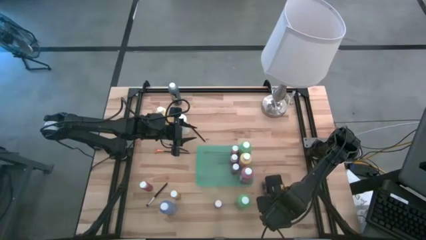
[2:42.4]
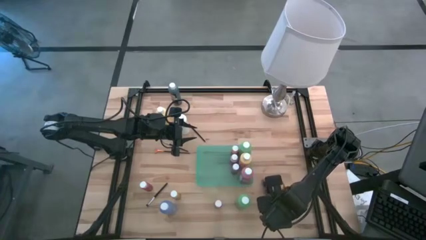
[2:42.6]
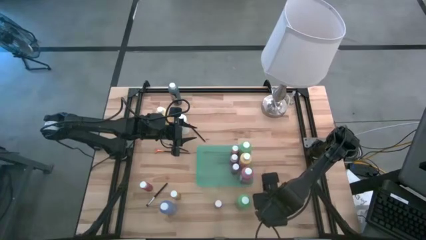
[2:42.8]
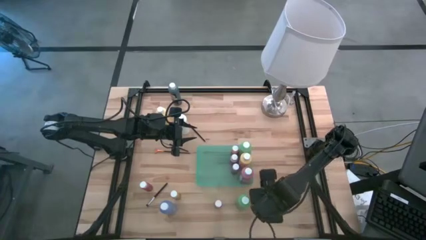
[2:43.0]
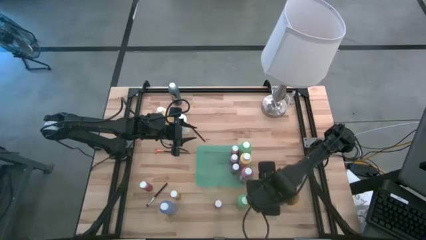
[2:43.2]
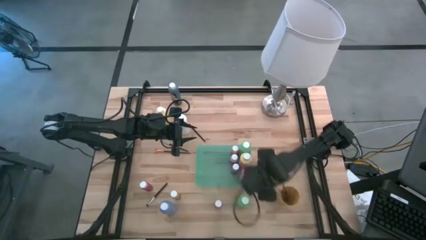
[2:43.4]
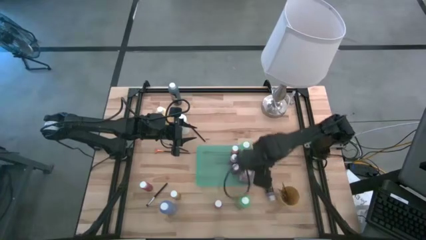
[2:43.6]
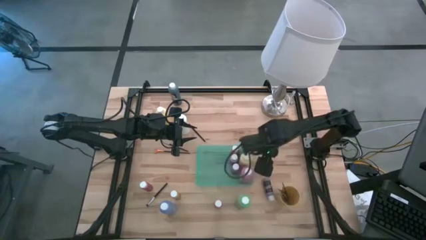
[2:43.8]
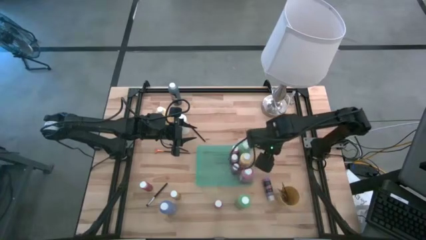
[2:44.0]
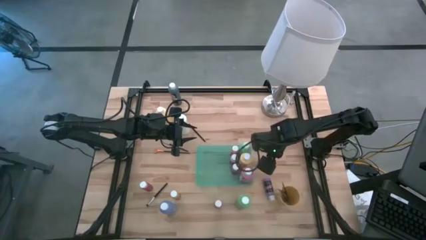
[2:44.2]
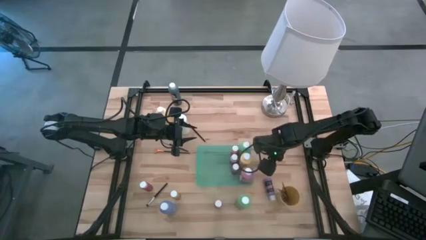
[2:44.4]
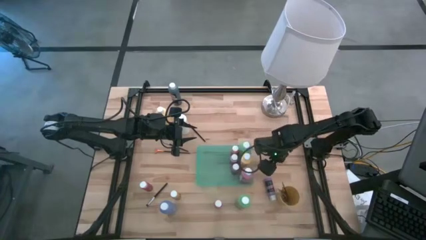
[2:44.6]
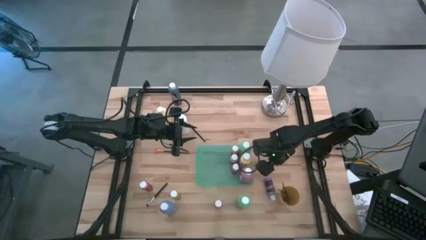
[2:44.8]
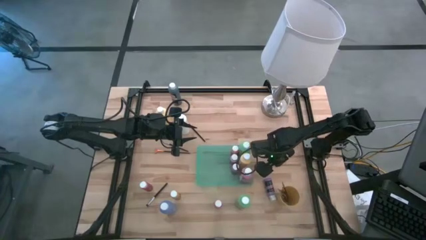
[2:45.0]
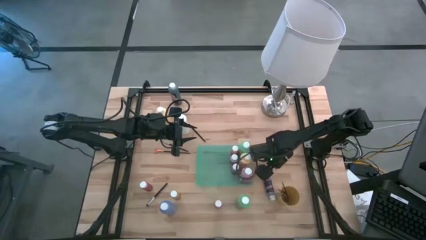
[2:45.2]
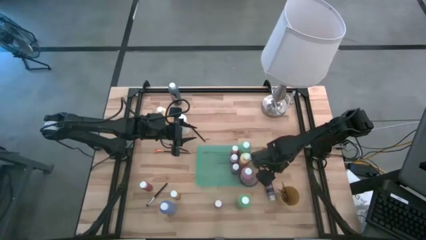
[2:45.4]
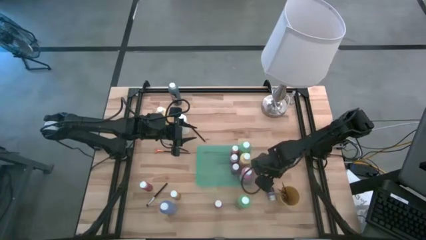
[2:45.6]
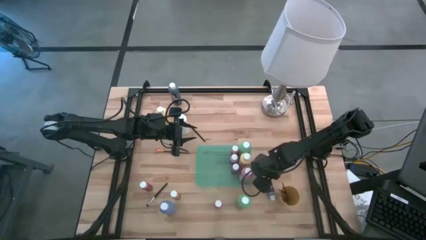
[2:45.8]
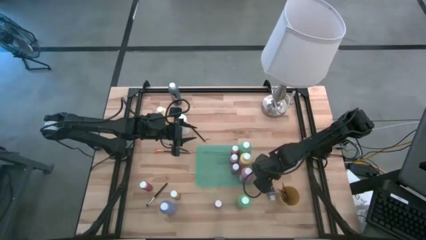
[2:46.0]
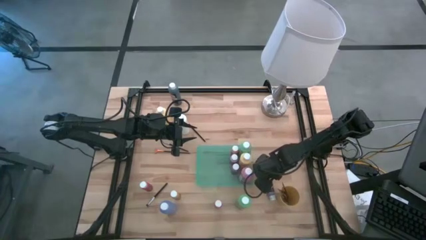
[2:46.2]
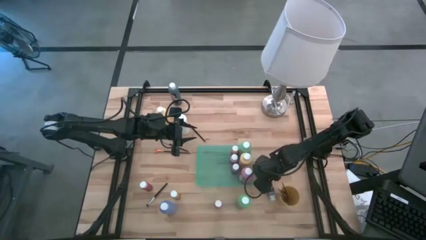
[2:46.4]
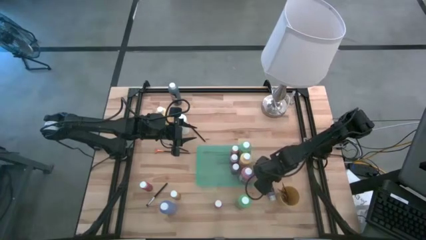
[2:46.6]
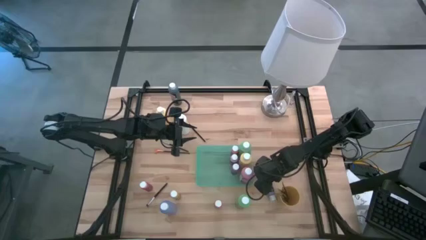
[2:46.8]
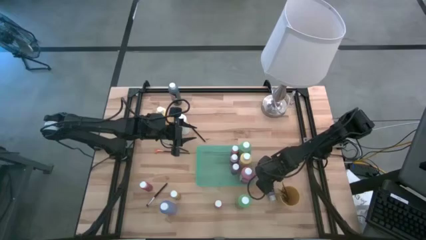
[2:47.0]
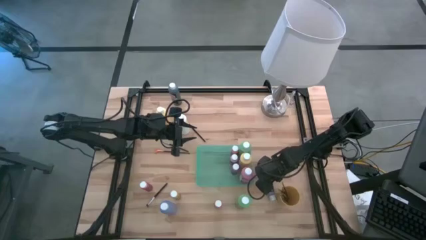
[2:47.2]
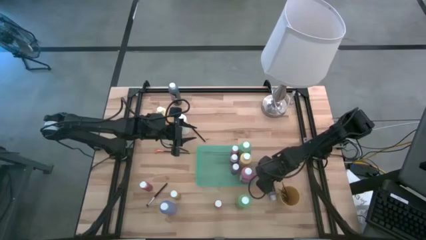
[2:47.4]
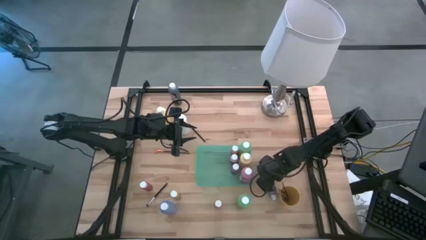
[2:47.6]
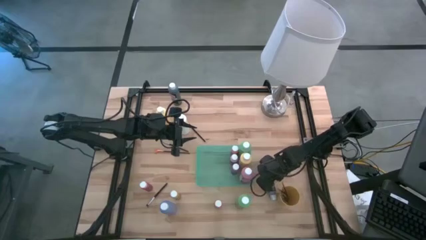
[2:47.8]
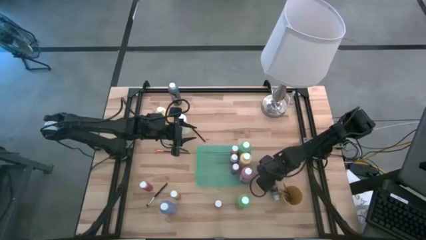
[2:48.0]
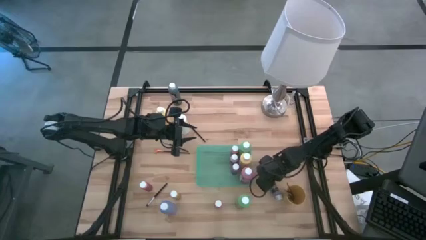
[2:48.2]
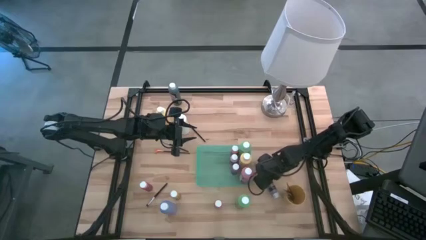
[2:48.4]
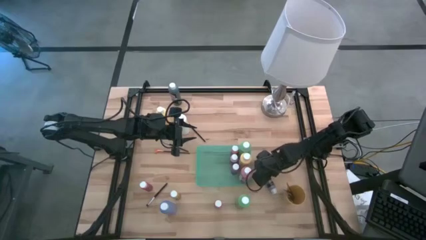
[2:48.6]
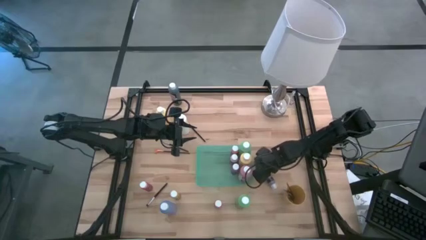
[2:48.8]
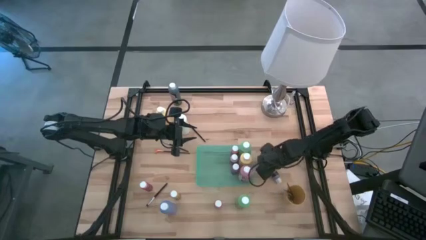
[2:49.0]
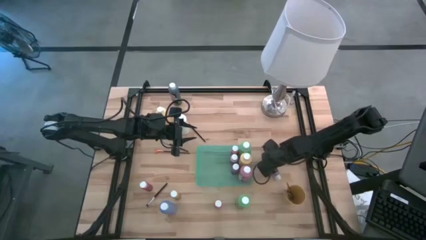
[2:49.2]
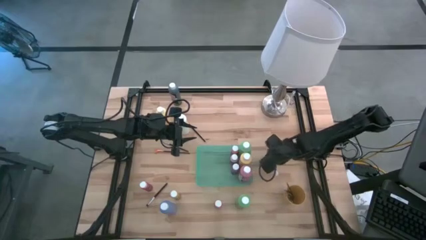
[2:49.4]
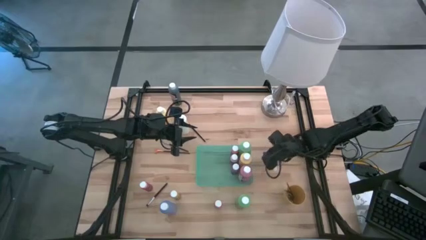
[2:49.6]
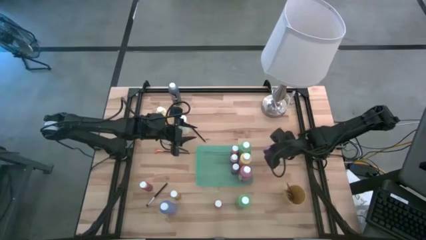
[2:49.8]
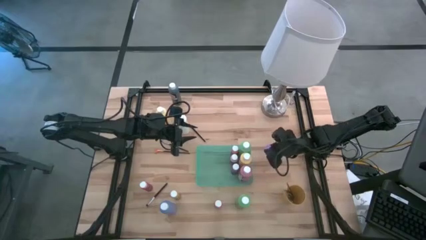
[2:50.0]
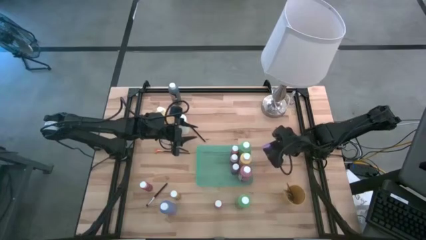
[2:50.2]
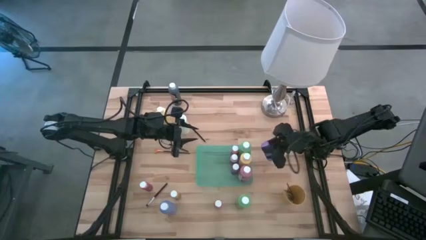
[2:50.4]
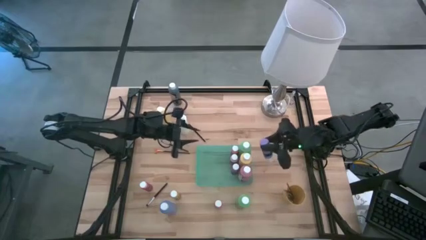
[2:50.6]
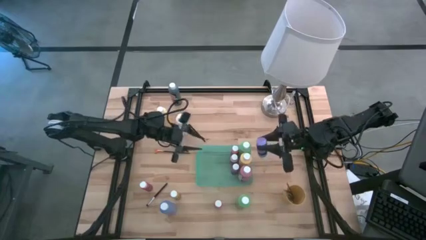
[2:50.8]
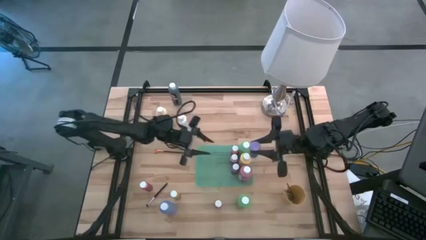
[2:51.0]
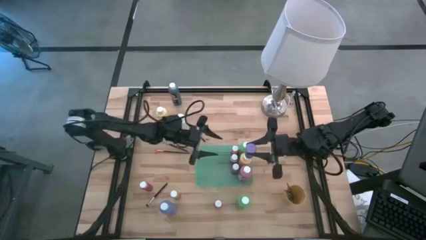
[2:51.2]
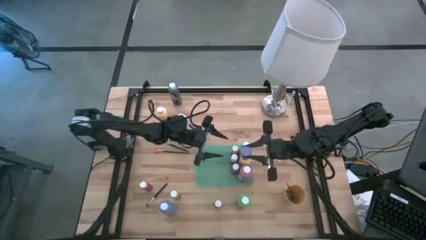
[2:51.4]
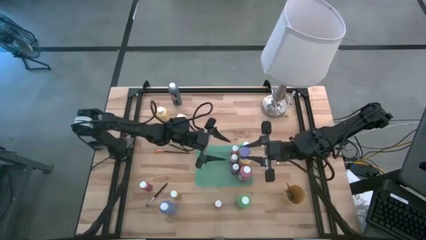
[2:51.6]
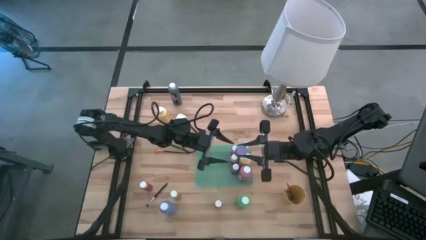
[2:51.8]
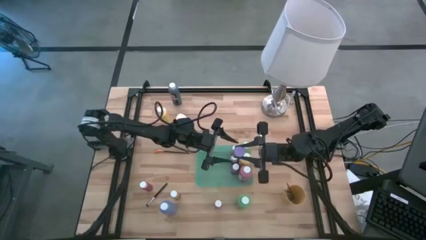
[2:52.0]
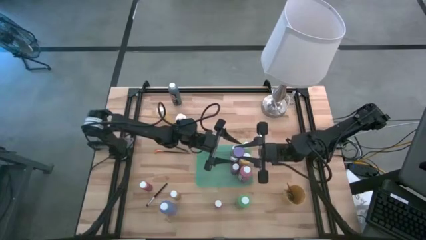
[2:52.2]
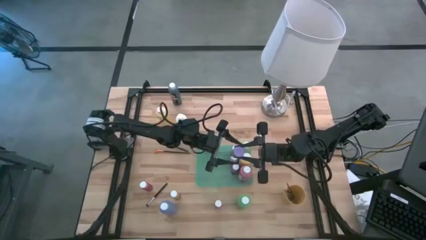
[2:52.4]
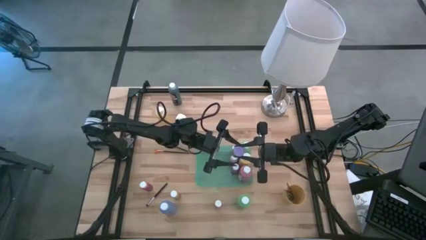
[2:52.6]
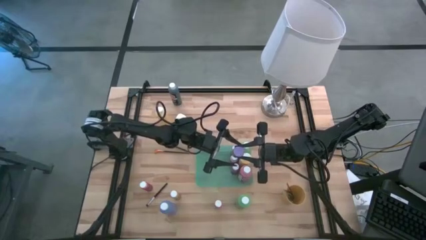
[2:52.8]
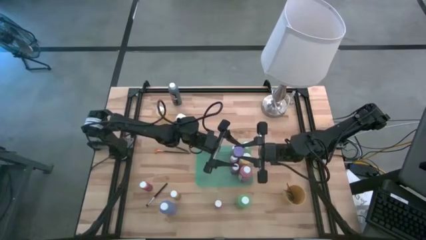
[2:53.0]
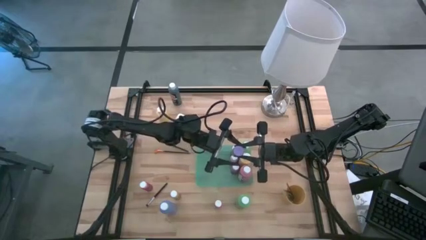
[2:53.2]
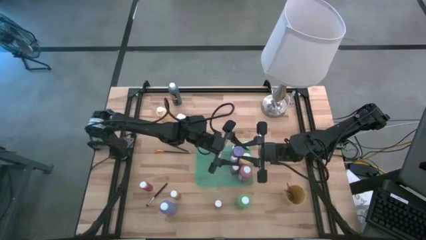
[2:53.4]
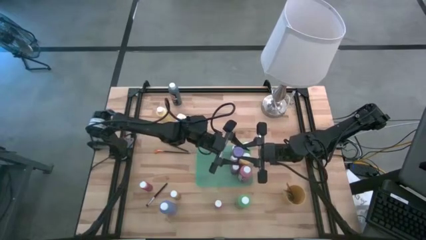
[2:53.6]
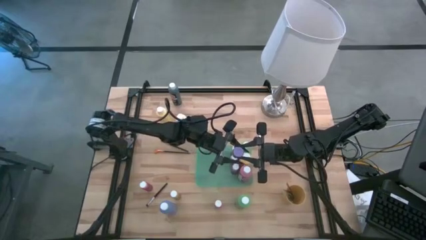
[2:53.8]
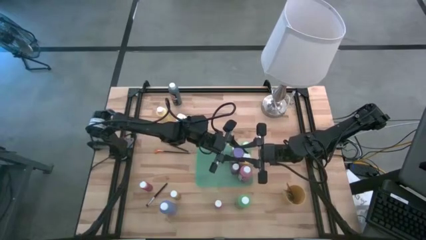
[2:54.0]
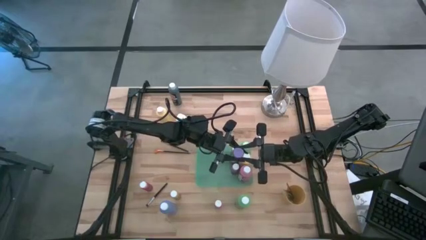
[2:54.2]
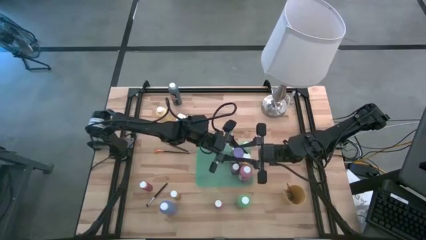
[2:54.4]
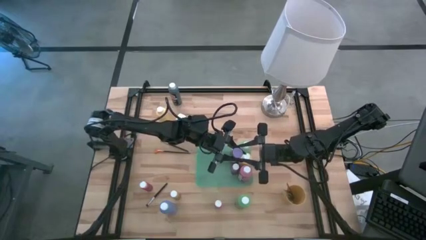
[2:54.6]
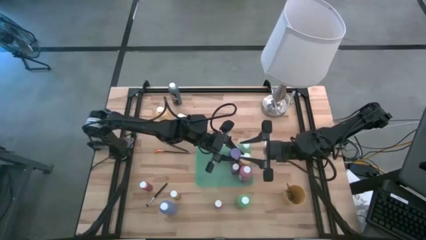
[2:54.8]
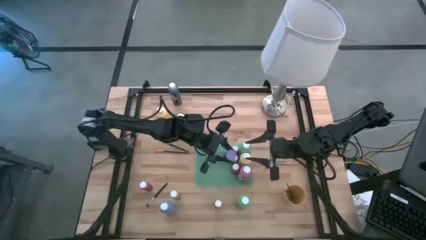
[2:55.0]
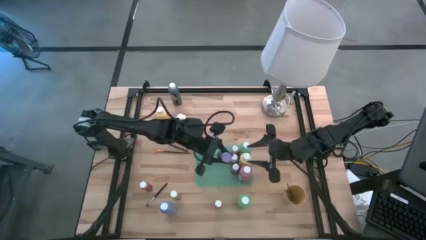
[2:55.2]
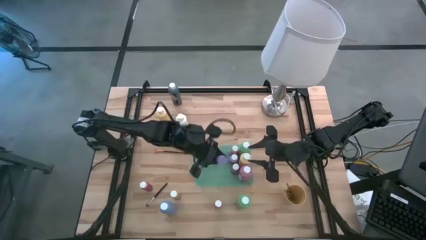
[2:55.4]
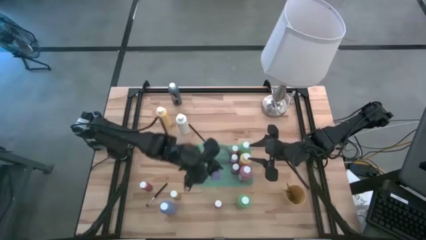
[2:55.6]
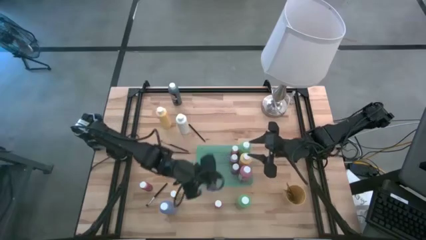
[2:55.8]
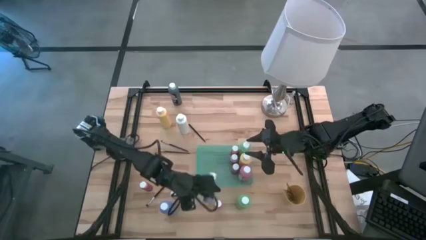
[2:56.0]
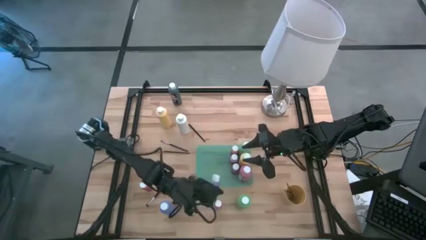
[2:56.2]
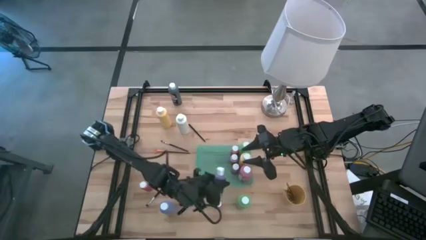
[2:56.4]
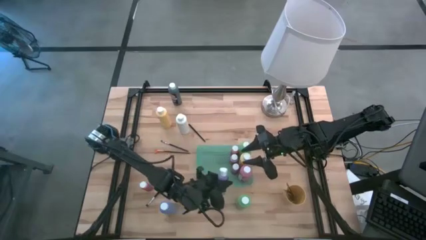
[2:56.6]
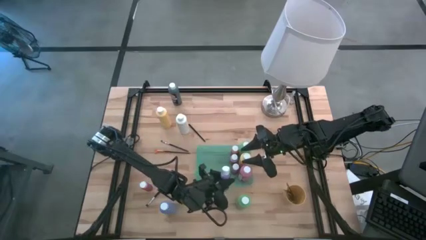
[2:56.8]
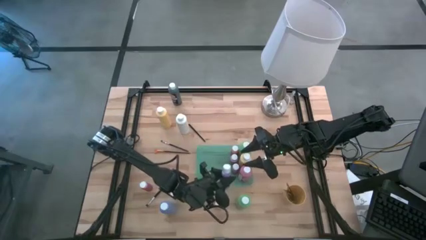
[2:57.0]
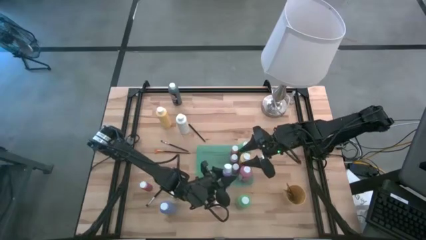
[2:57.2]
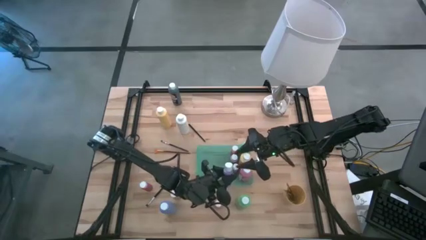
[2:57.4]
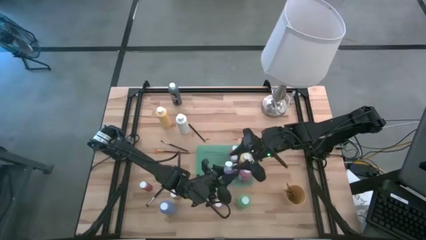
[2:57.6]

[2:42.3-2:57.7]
Task: Pick & Place Paint Supplies
Put the purple paint bottle into the green bin
